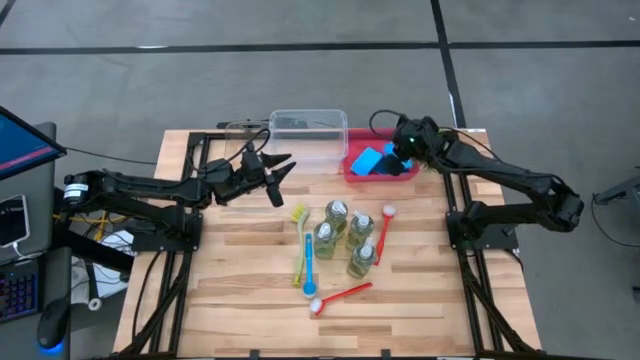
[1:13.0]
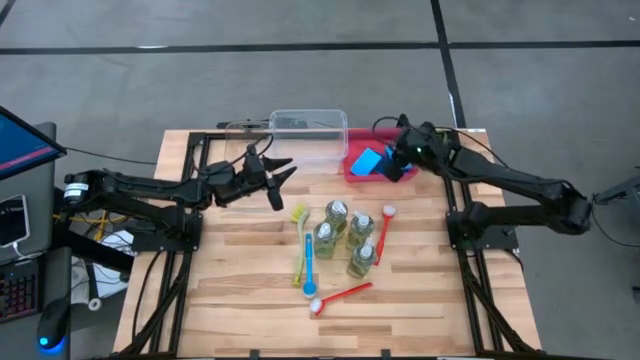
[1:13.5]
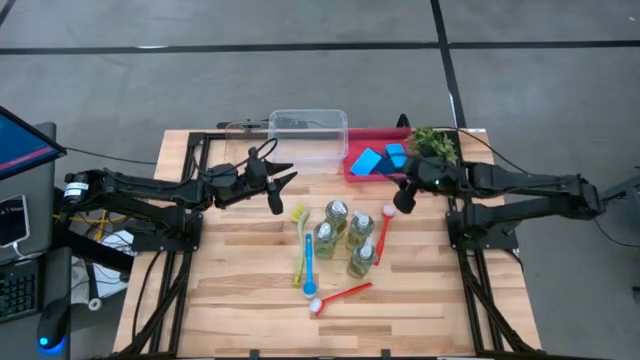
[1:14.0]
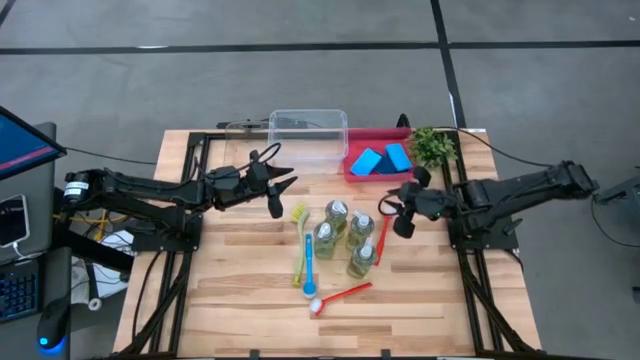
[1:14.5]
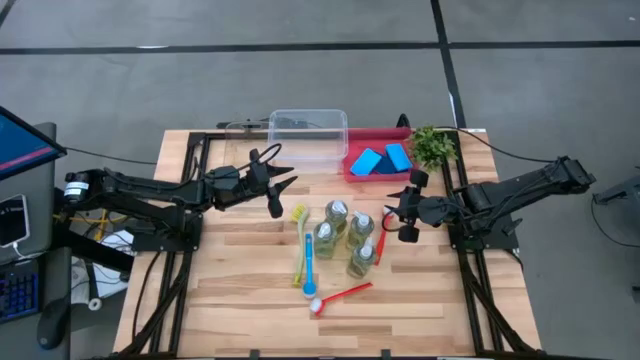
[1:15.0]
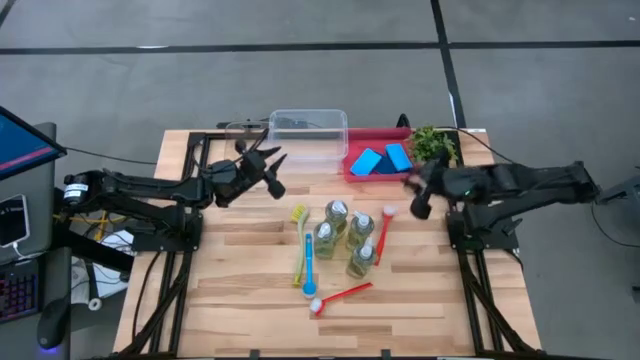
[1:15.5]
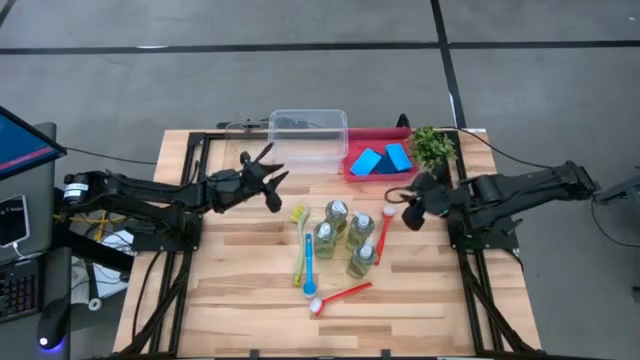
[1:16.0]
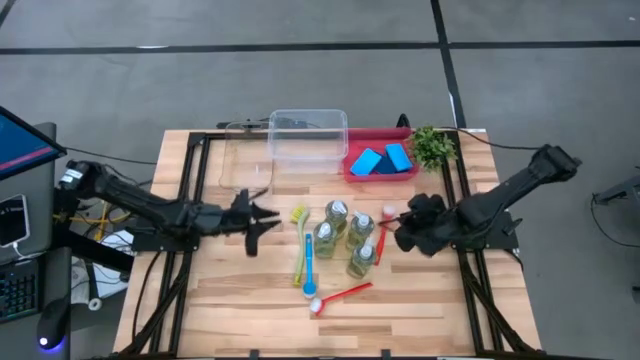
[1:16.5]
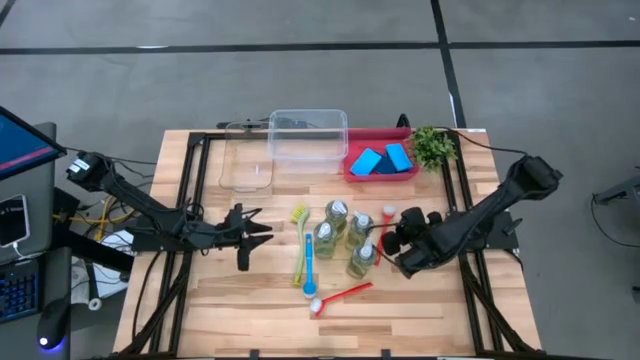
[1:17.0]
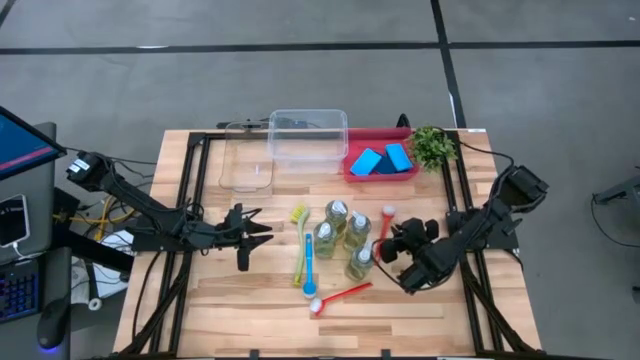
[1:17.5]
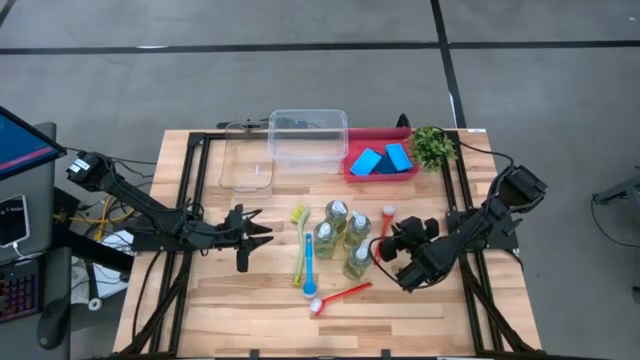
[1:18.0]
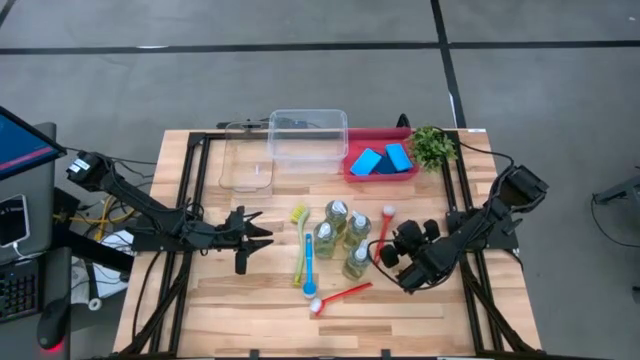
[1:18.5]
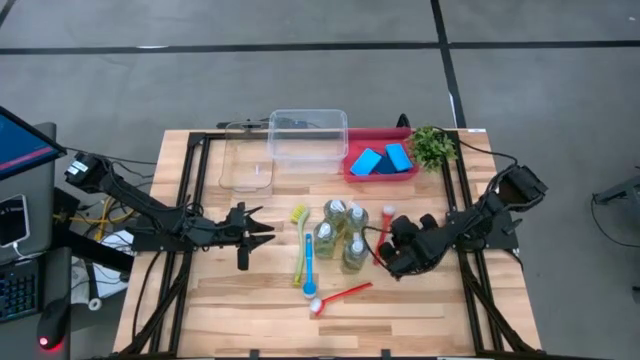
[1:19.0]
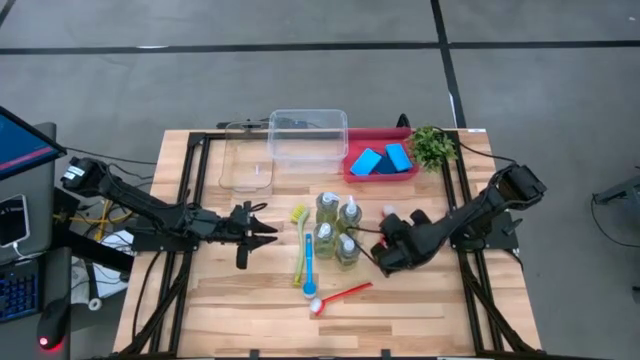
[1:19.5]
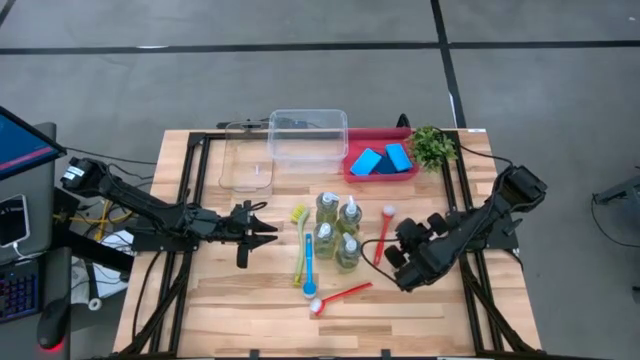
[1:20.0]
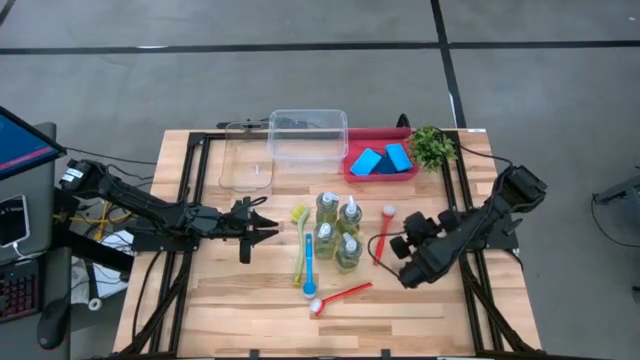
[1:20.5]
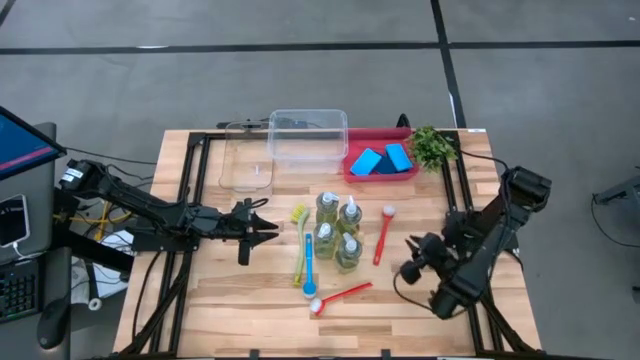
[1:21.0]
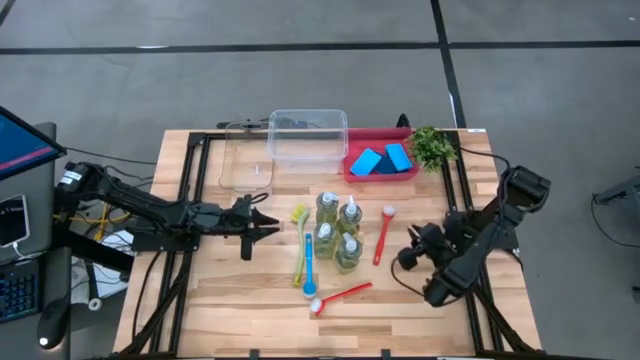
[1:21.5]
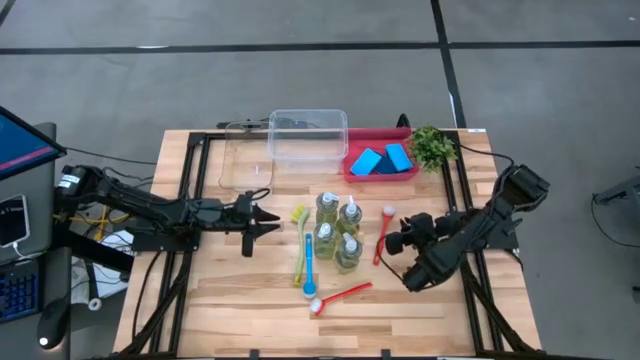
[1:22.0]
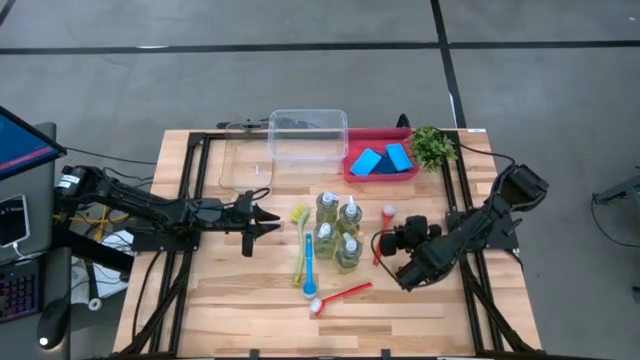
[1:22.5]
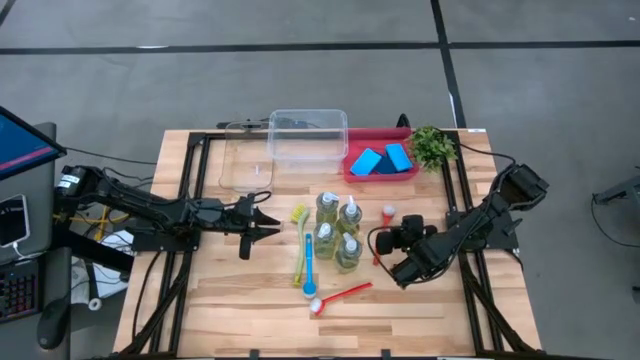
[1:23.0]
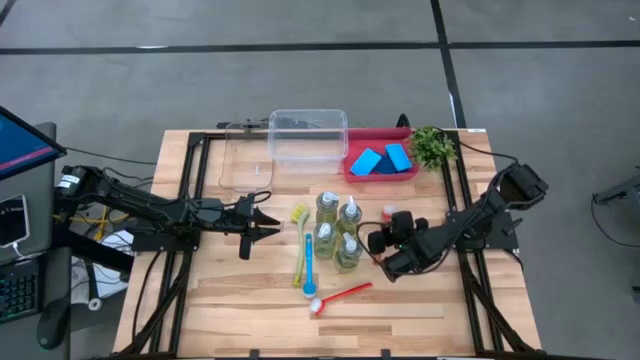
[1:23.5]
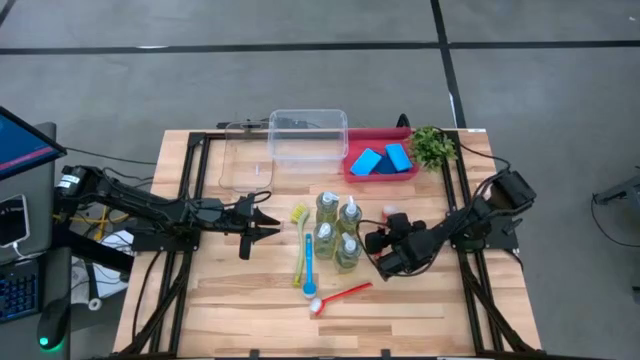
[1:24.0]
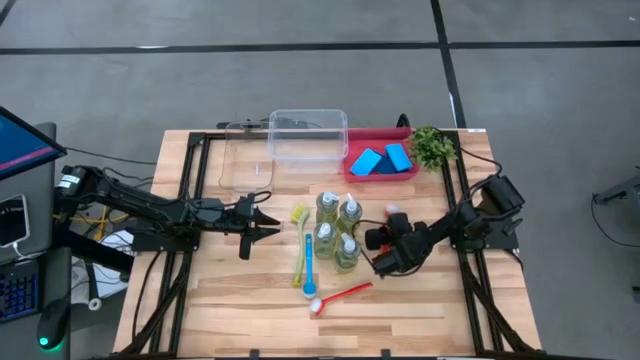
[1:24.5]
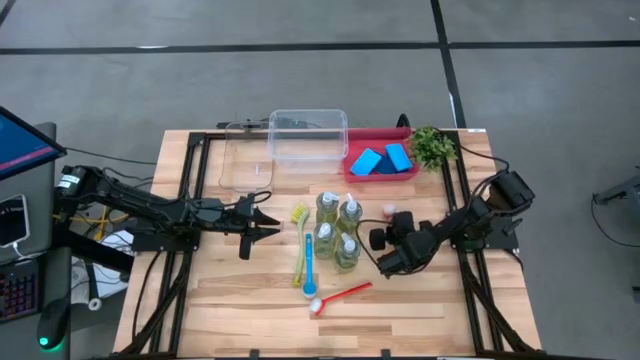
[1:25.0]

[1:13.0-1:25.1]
Task: Pick & Place Kitchen Sink Supplies
Put the dish brush into the left transparent bin

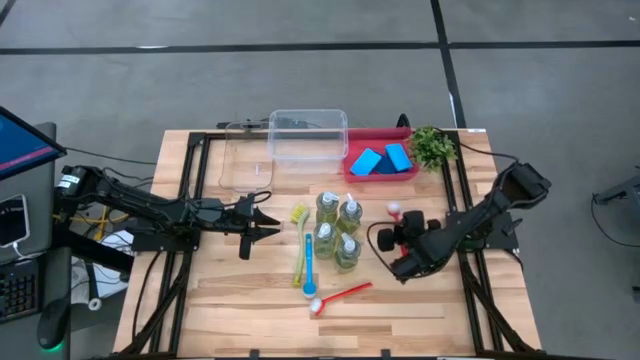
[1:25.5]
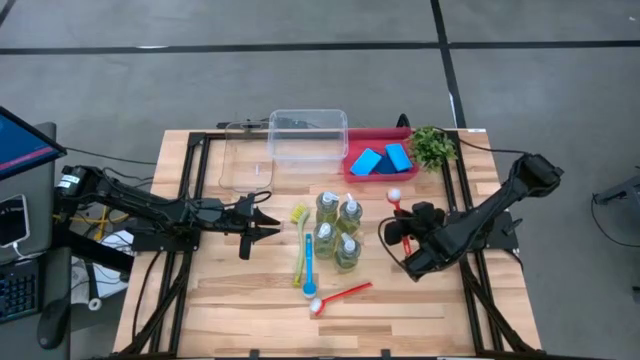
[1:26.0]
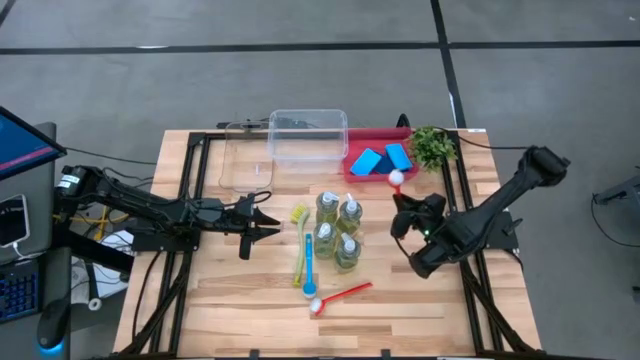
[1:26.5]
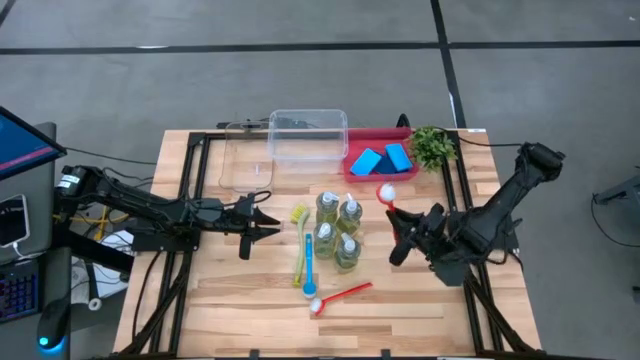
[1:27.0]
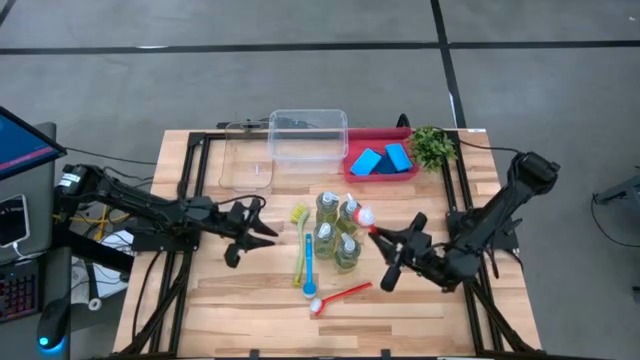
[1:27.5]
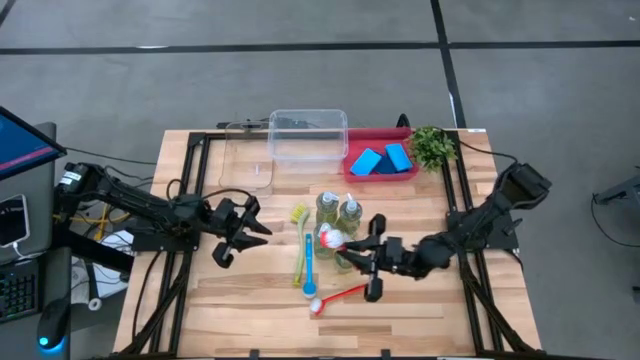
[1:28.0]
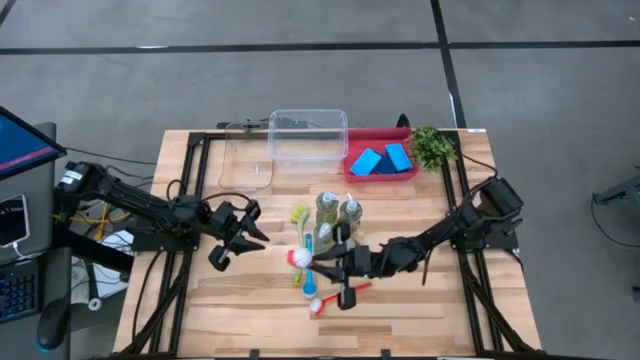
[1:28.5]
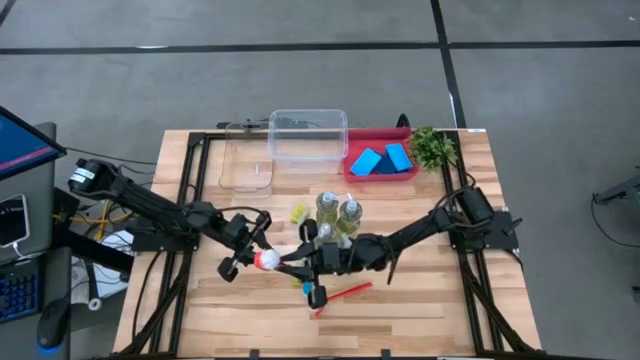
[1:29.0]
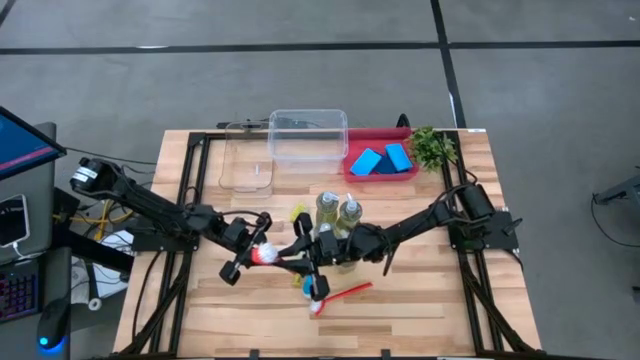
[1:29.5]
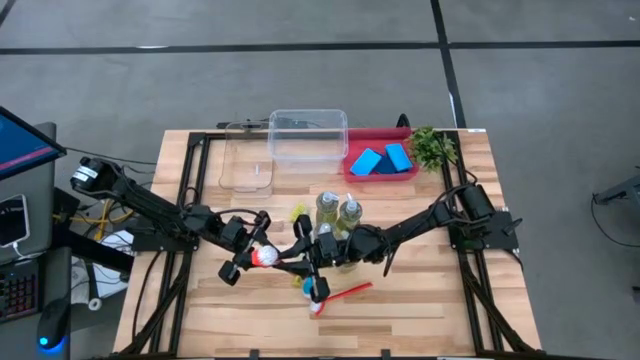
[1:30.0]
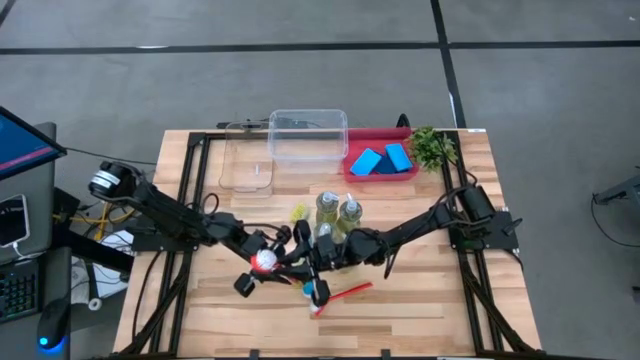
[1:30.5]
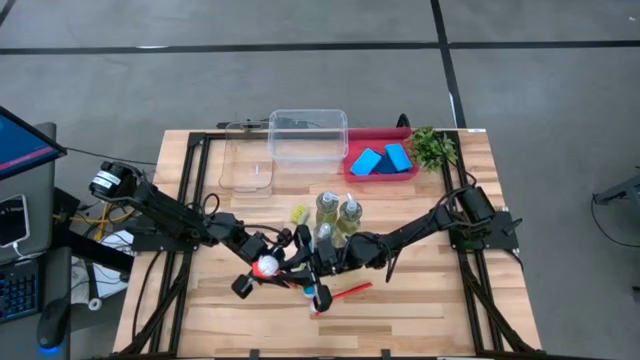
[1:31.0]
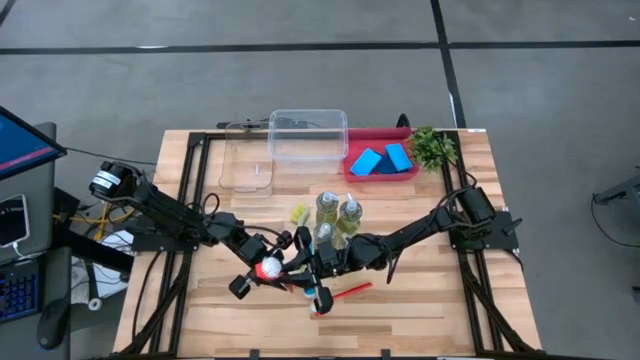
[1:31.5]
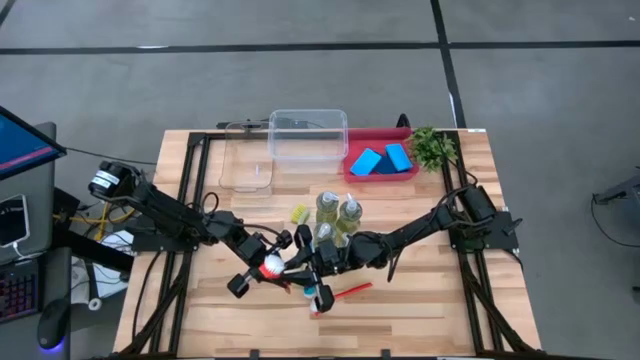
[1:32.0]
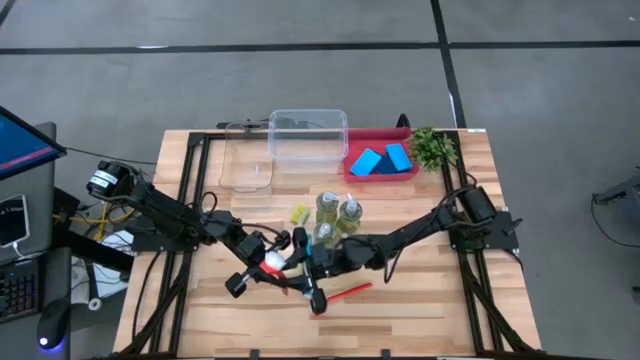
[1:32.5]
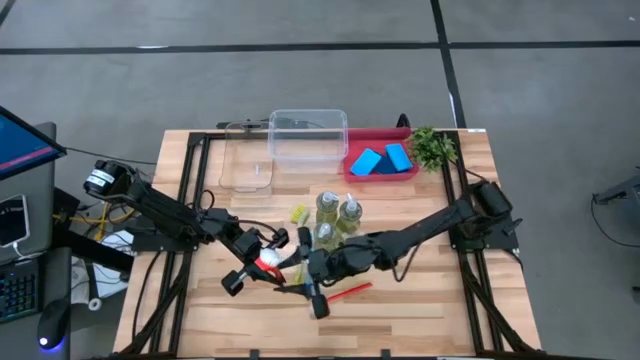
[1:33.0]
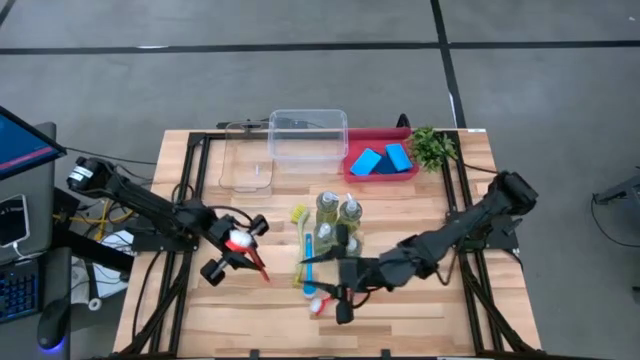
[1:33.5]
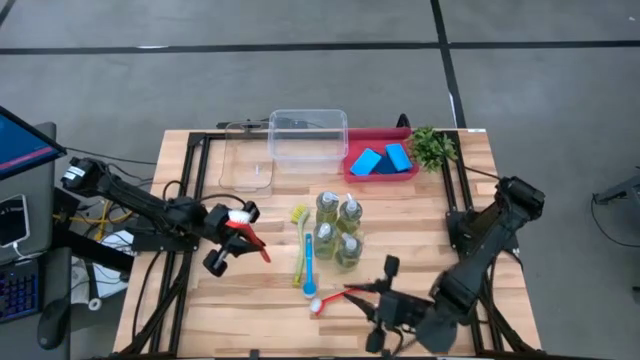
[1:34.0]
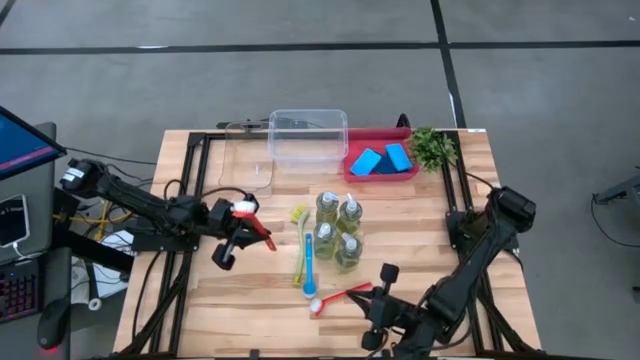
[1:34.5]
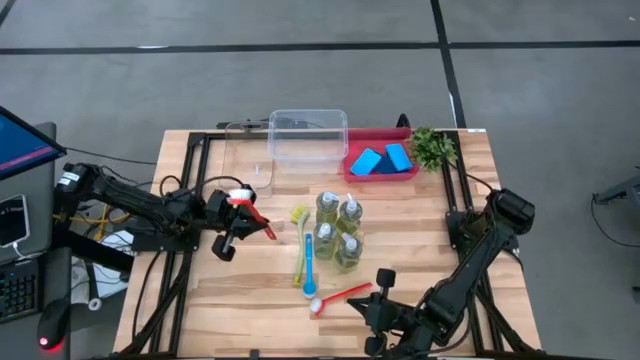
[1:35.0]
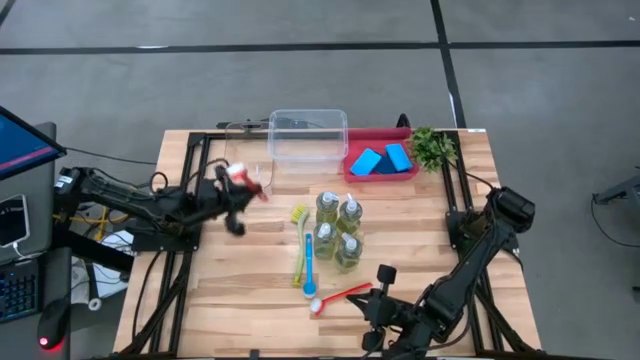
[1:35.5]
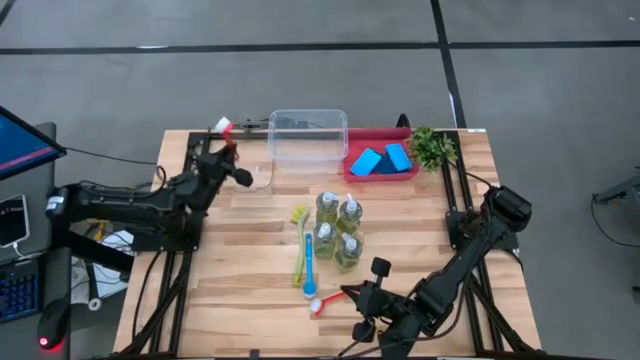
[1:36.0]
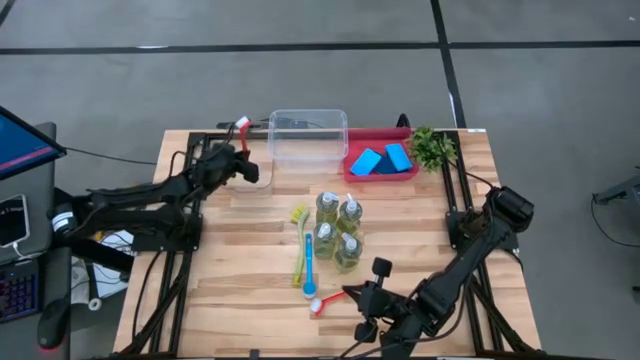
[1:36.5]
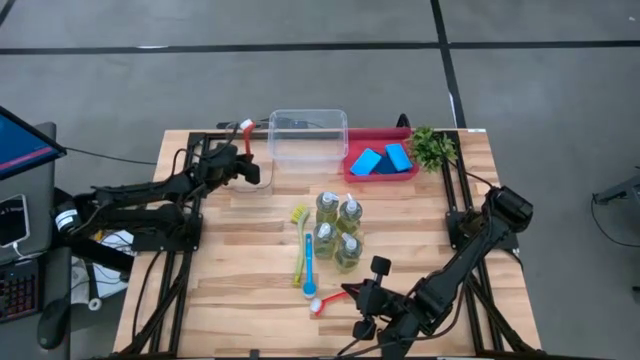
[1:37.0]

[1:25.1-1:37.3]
Put the dish brush into the left transparent bin
